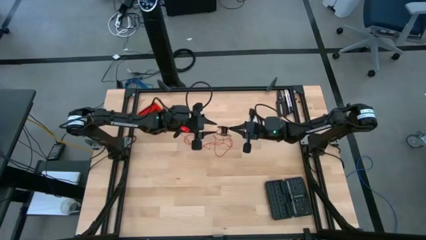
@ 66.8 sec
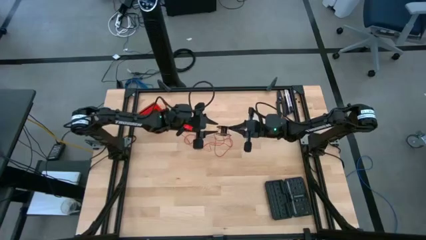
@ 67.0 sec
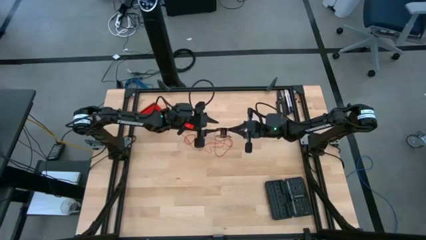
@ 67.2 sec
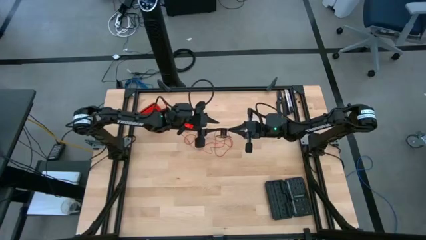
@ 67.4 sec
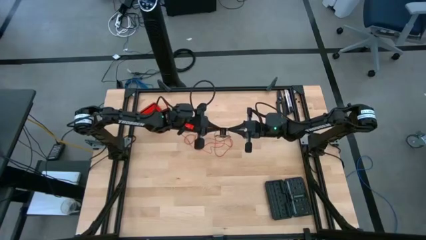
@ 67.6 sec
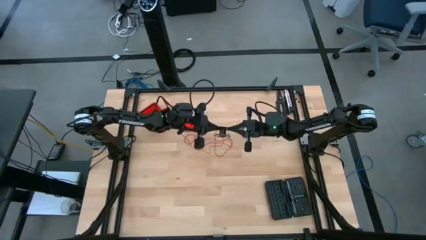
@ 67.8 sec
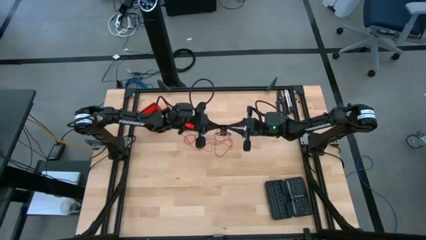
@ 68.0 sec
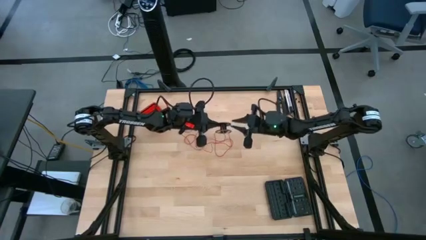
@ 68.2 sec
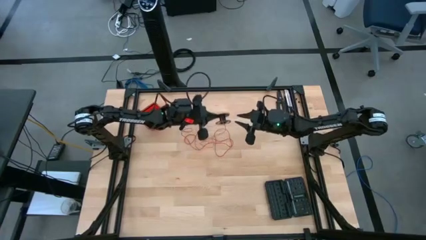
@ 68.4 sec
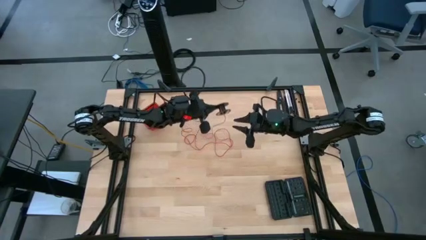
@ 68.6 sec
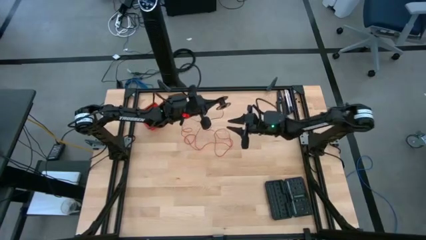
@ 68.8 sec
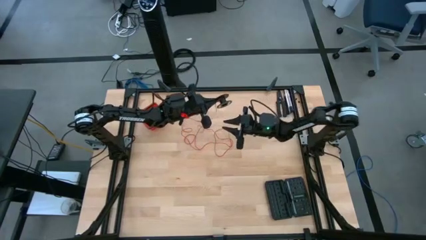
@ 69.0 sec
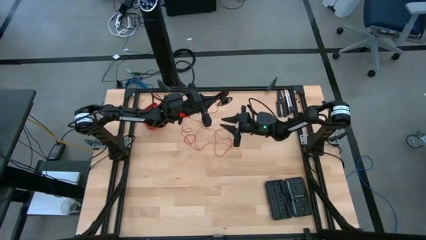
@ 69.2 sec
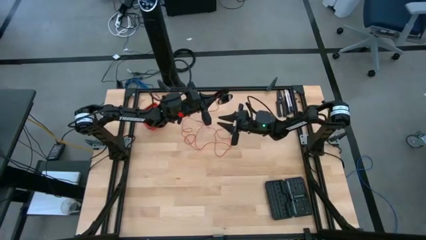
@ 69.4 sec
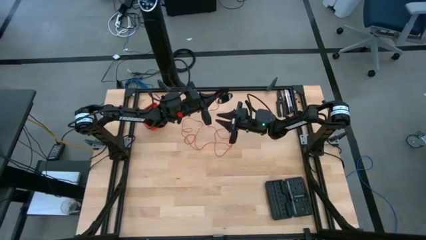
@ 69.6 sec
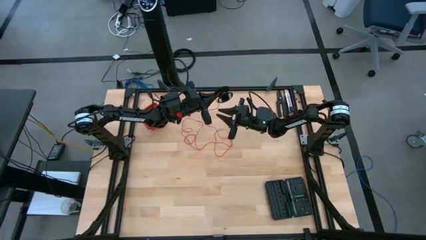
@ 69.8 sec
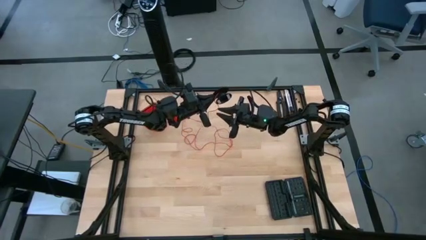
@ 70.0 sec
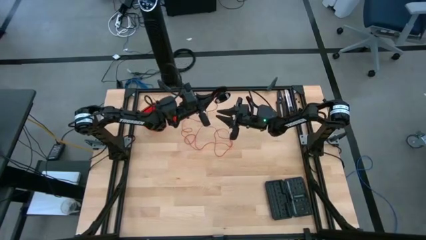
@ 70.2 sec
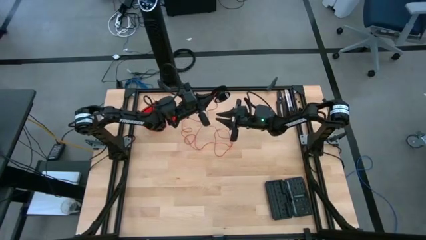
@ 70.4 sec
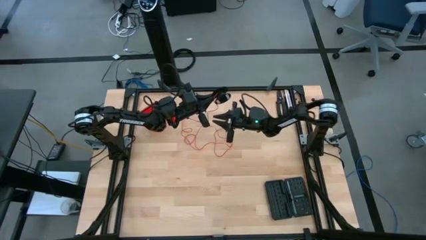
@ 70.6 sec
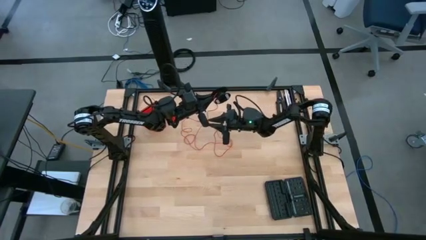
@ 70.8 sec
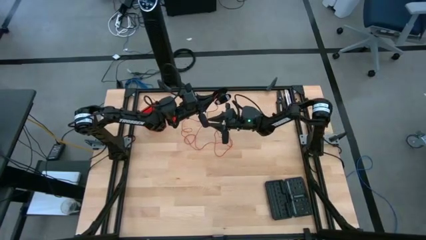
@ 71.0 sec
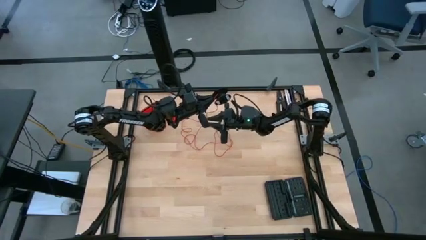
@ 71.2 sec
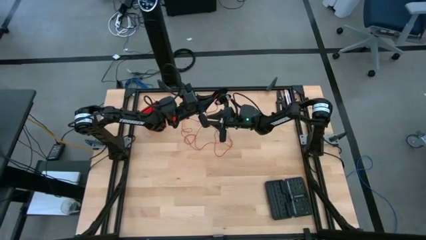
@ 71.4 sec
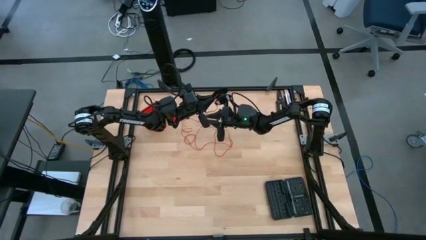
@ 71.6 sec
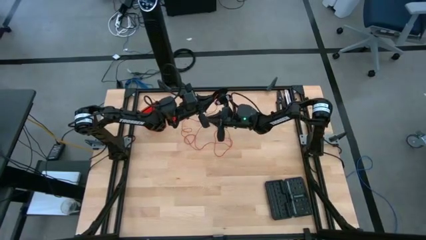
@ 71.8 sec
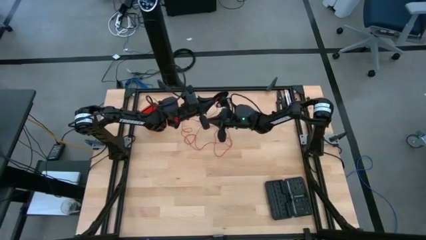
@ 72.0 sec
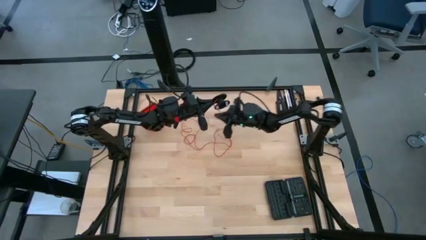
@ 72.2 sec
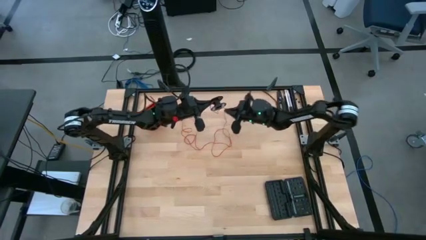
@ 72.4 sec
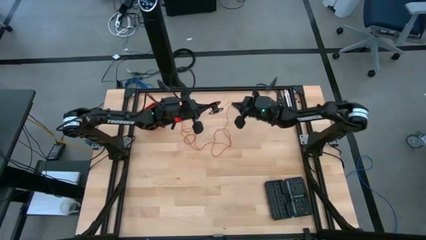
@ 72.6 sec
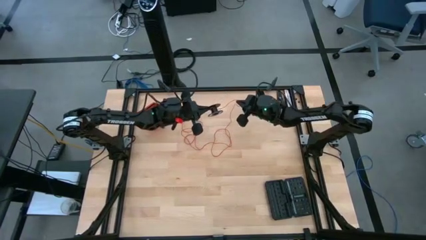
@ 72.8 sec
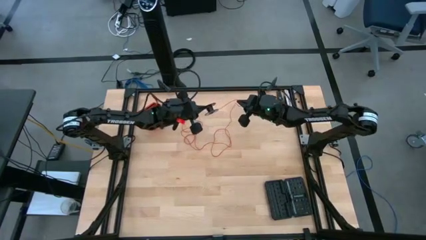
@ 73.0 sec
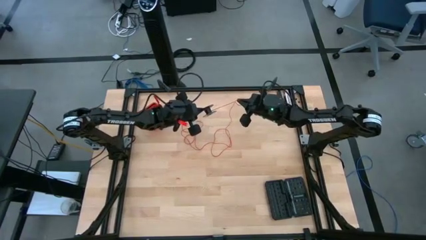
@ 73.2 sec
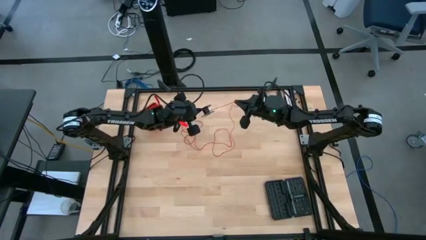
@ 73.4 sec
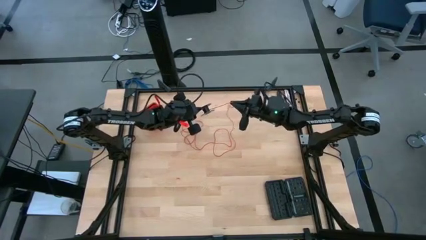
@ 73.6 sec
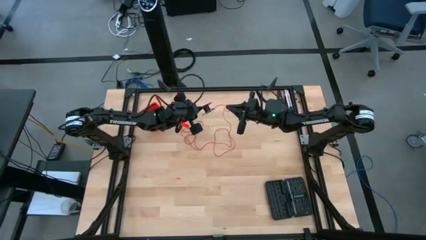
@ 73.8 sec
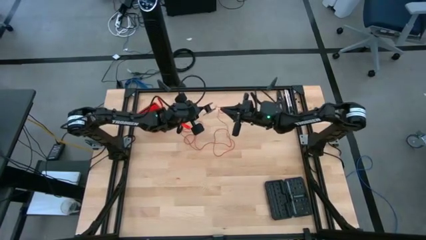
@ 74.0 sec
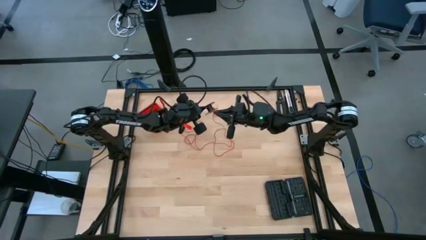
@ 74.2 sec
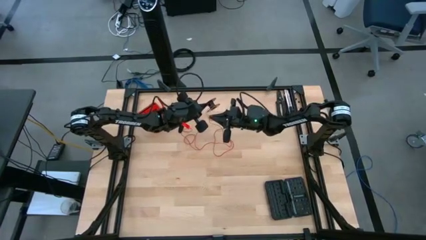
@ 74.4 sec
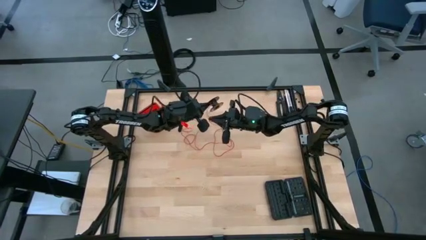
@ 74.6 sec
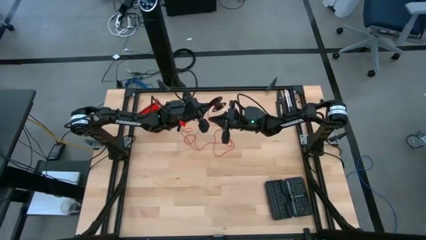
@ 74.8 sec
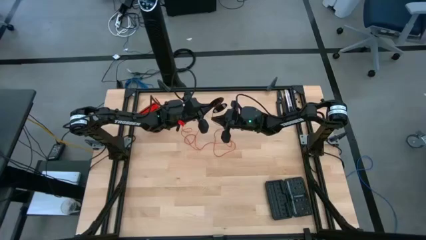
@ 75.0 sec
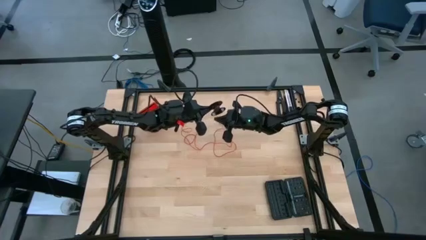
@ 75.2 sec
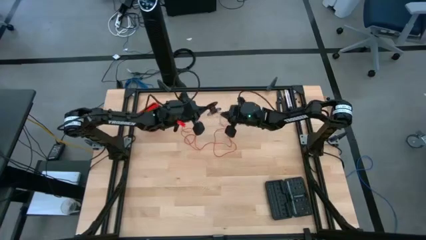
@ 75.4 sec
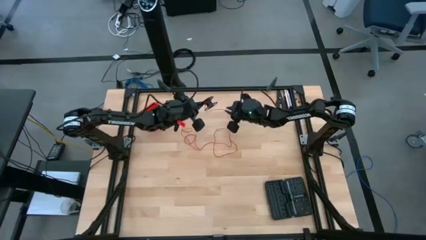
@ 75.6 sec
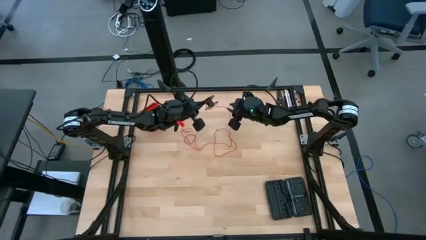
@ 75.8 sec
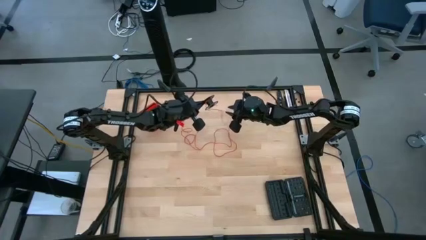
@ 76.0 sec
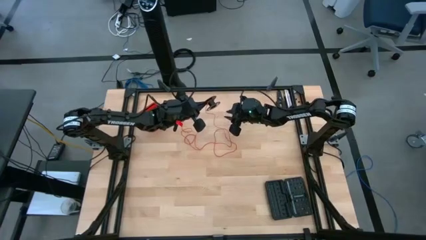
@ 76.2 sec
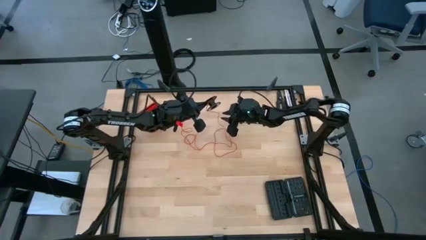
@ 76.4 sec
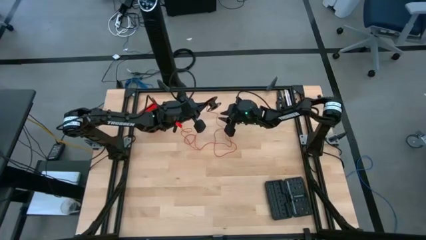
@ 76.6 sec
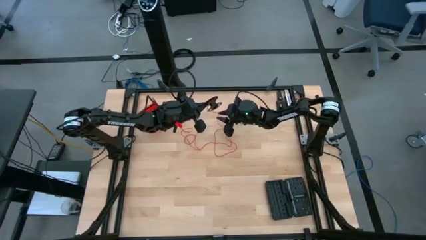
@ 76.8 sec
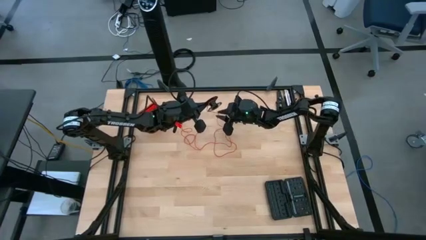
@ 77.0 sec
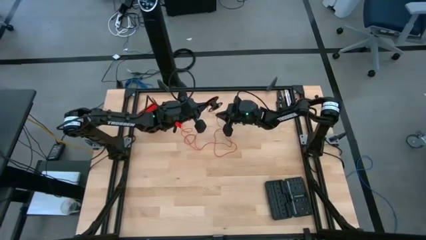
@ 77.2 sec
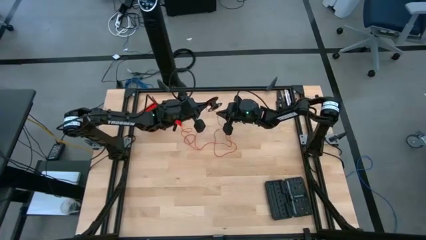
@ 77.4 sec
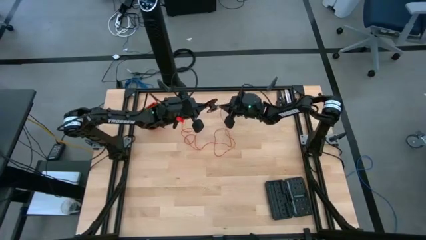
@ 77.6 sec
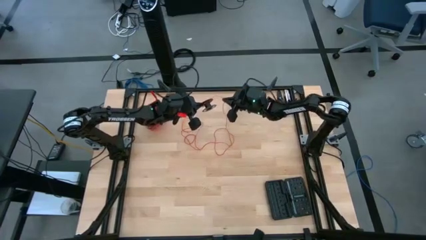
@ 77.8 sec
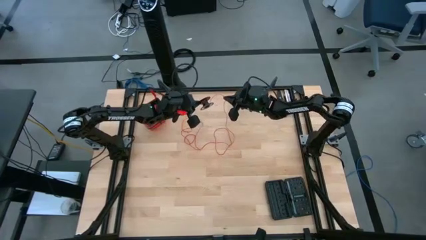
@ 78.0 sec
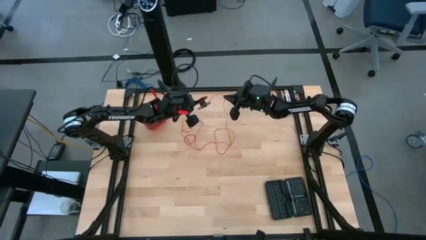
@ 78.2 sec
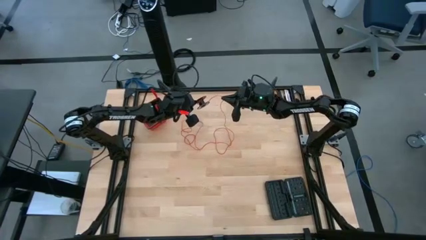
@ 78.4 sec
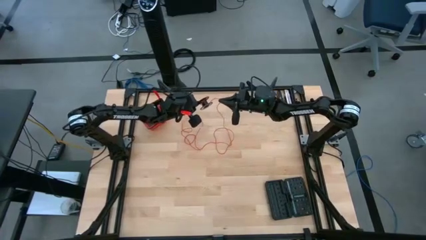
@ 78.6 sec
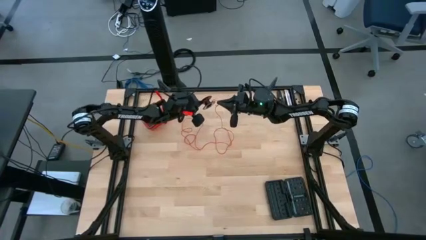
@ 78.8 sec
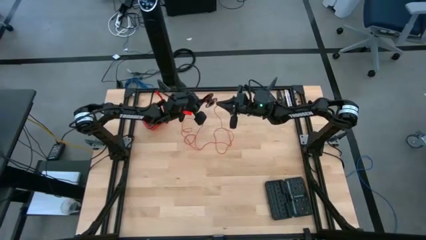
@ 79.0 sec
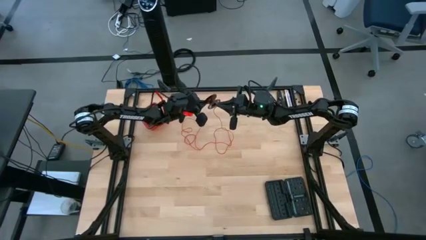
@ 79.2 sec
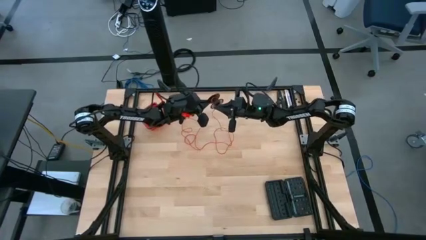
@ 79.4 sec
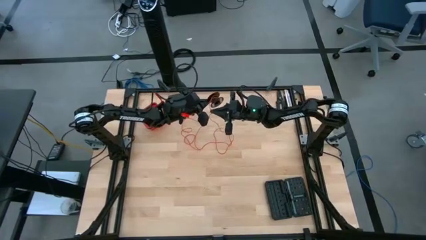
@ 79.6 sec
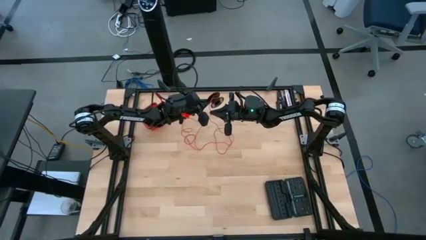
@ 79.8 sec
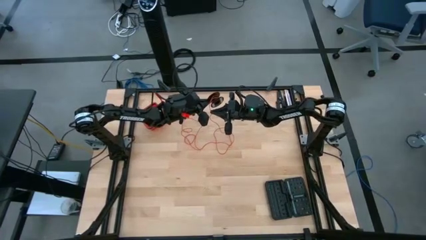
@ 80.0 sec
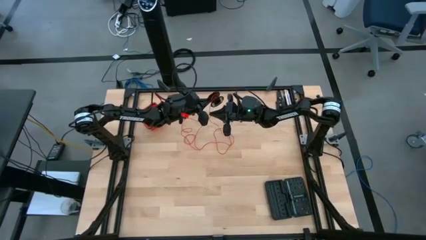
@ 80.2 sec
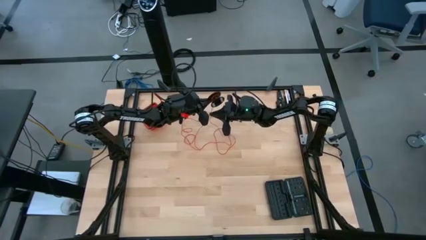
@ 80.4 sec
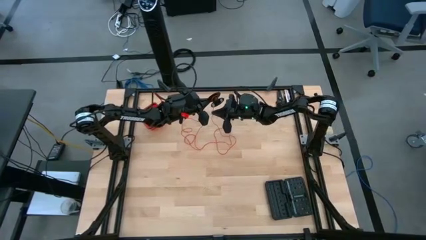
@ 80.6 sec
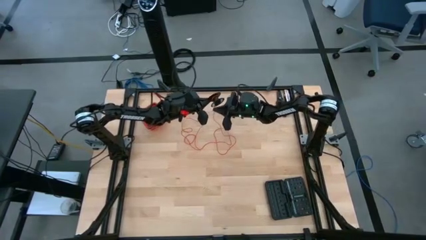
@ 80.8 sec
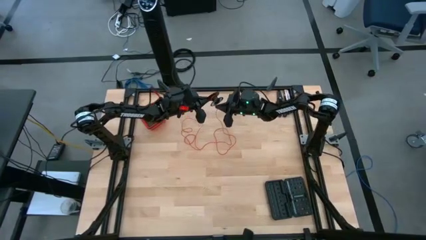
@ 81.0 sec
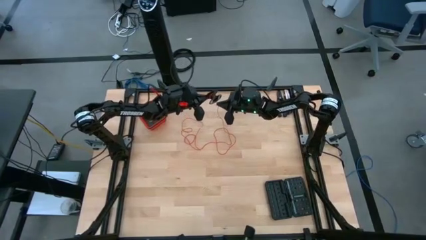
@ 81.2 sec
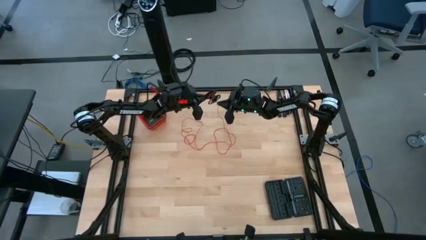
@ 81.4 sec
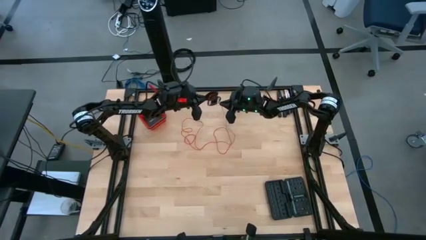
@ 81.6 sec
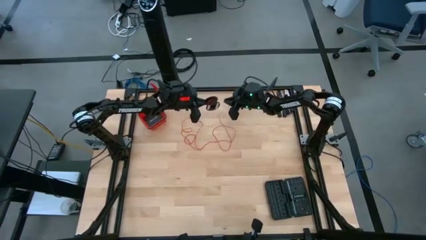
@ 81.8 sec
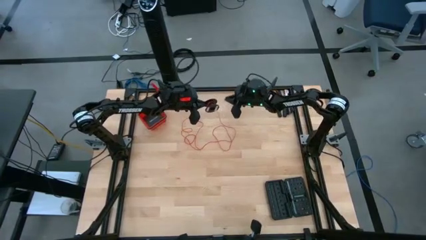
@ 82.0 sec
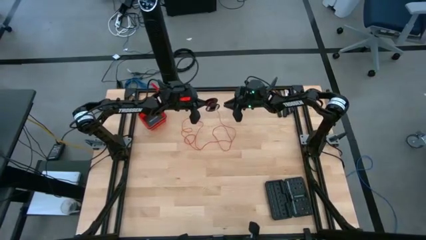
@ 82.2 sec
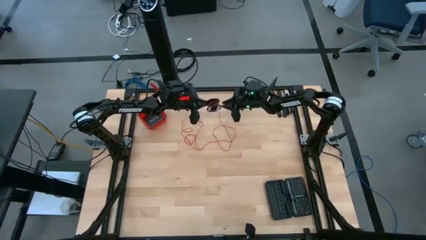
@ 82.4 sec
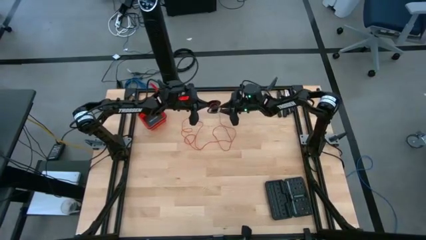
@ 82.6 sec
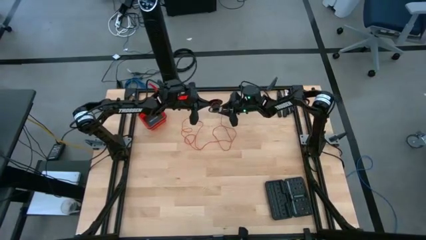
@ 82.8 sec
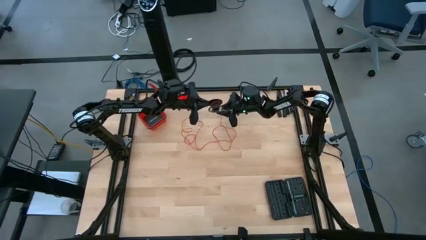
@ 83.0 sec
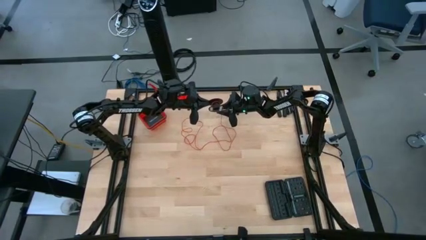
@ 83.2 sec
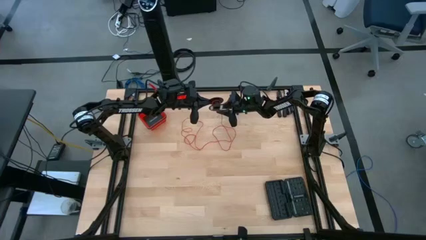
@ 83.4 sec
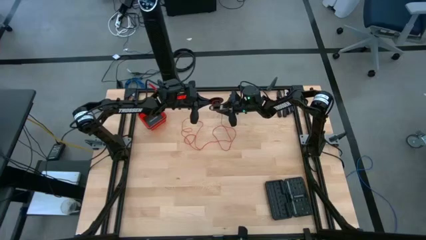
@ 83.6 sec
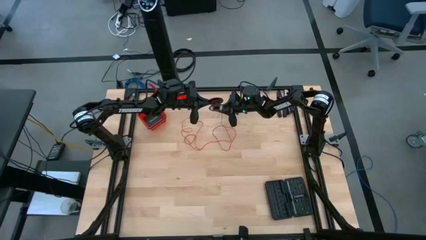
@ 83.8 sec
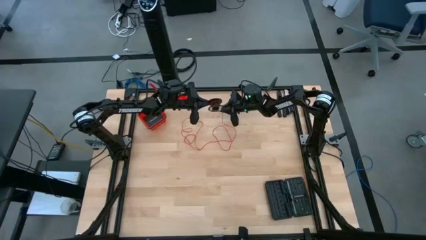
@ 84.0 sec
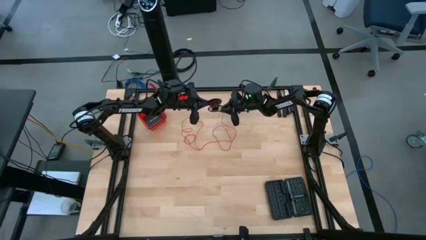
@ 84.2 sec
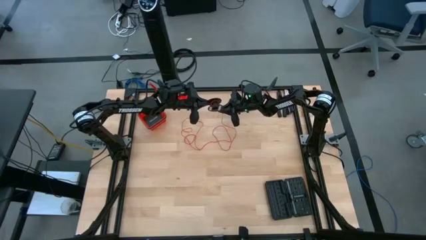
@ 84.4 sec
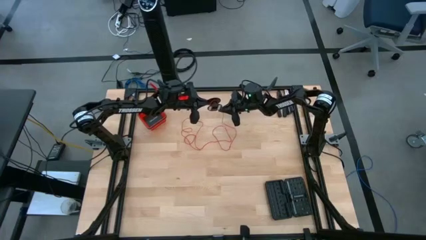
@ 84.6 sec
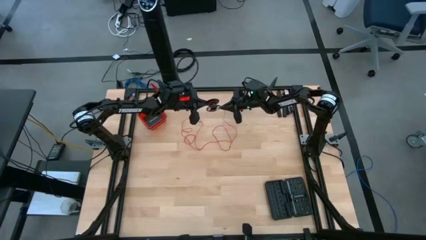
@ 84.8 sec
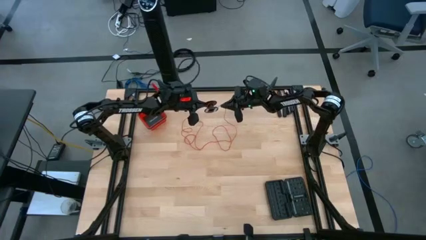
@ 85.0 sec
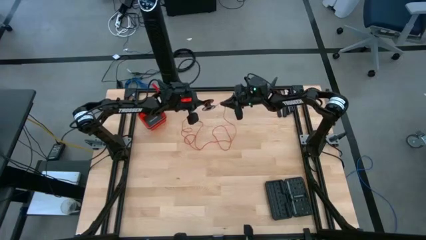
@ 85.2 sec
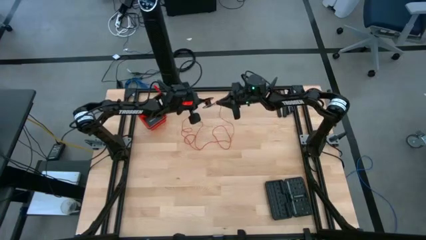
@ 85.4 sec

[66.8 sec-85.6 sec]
Task: Coil cords
Coil the wire to the spool
